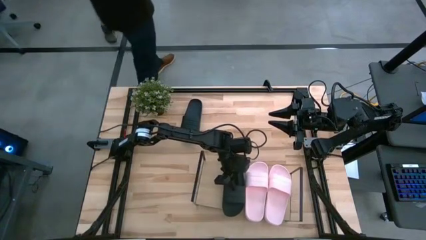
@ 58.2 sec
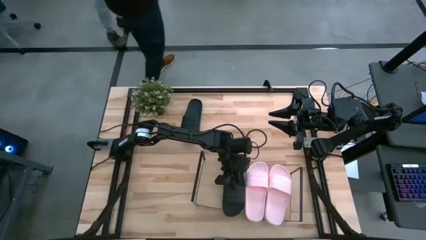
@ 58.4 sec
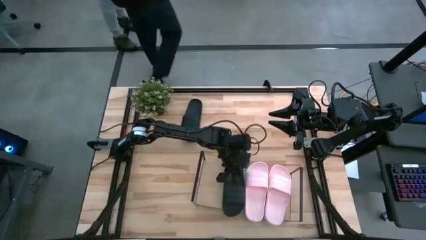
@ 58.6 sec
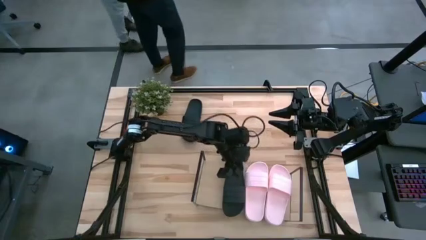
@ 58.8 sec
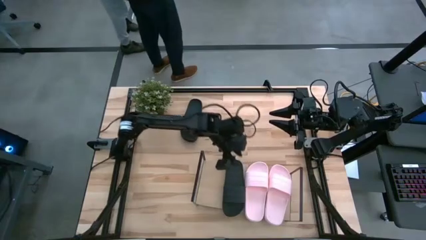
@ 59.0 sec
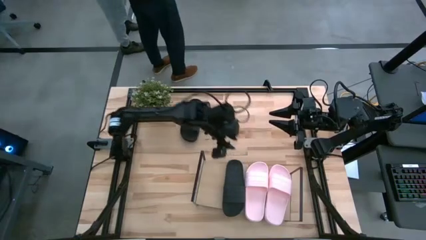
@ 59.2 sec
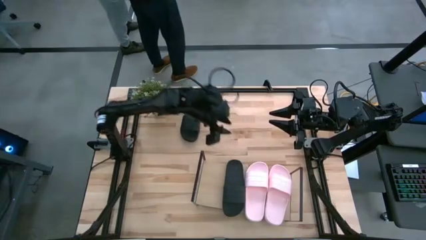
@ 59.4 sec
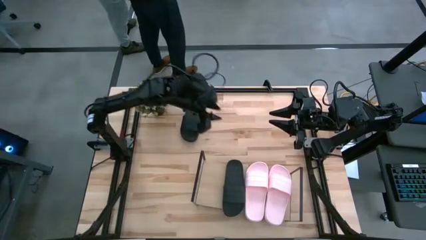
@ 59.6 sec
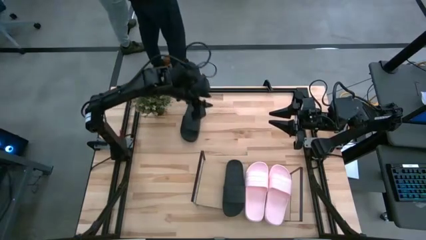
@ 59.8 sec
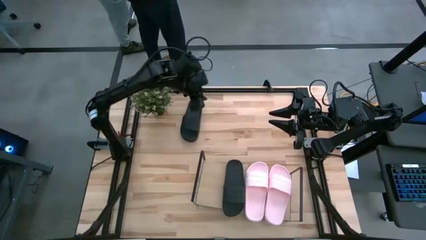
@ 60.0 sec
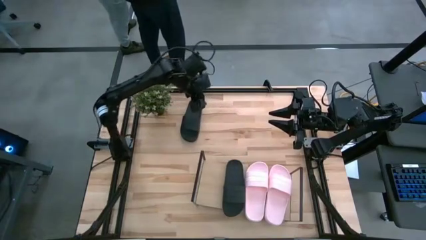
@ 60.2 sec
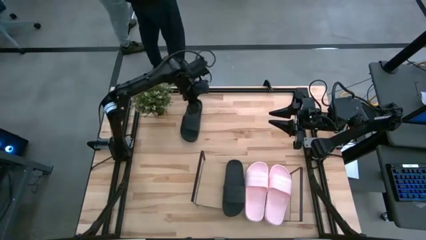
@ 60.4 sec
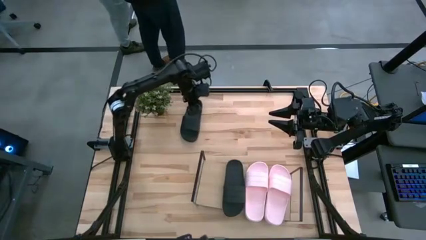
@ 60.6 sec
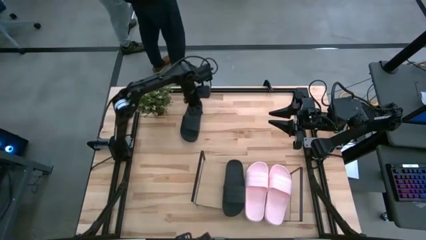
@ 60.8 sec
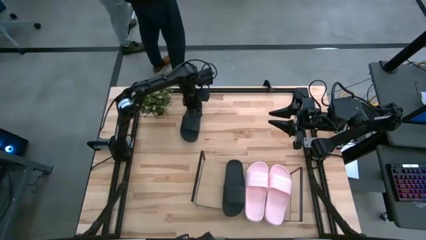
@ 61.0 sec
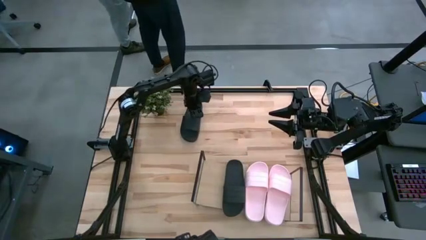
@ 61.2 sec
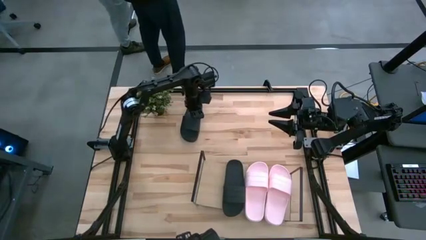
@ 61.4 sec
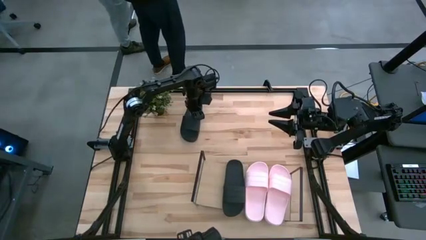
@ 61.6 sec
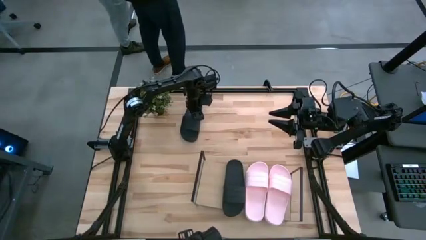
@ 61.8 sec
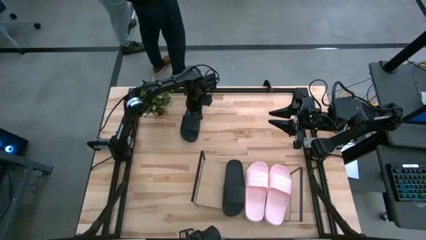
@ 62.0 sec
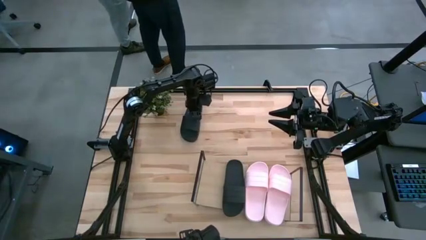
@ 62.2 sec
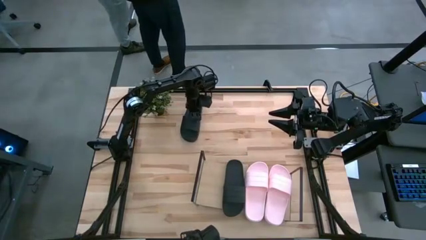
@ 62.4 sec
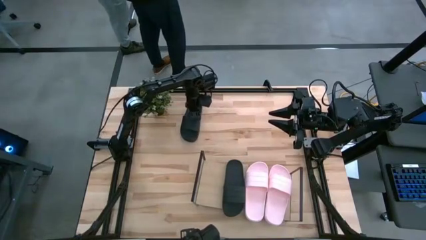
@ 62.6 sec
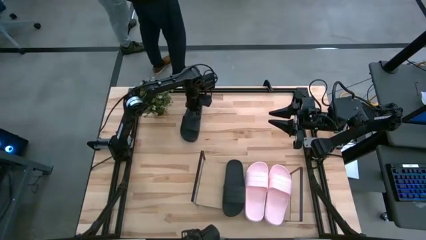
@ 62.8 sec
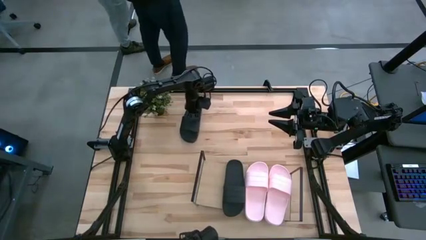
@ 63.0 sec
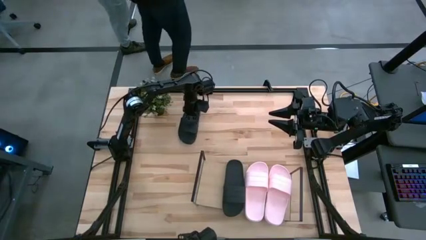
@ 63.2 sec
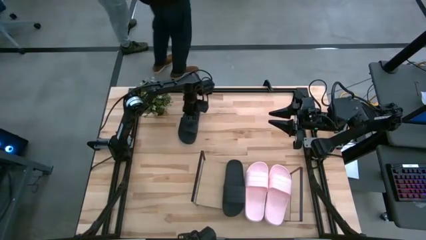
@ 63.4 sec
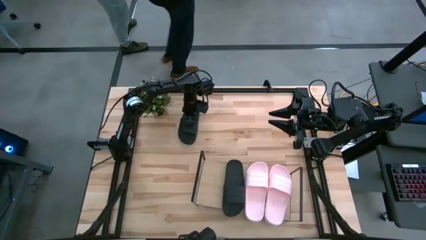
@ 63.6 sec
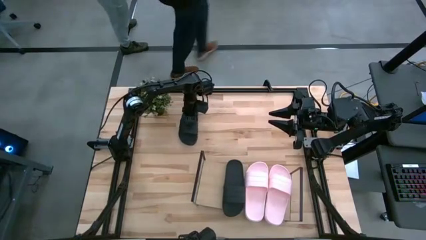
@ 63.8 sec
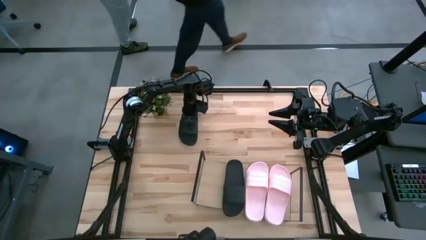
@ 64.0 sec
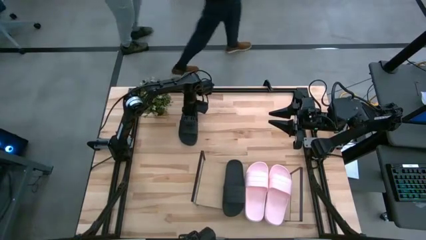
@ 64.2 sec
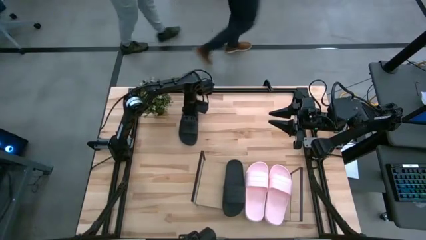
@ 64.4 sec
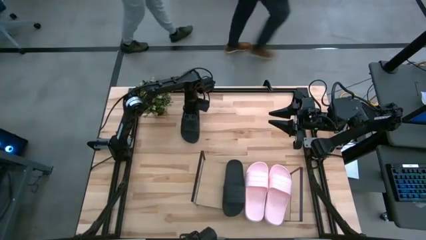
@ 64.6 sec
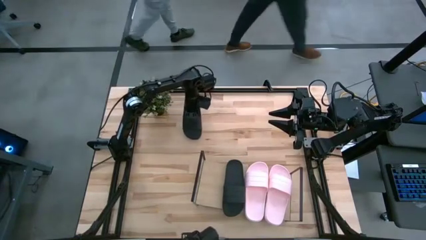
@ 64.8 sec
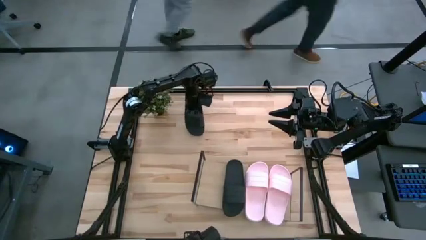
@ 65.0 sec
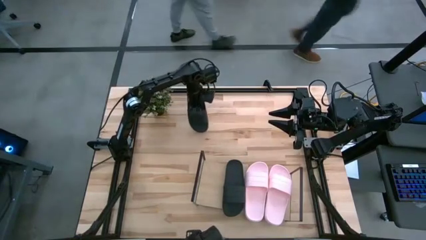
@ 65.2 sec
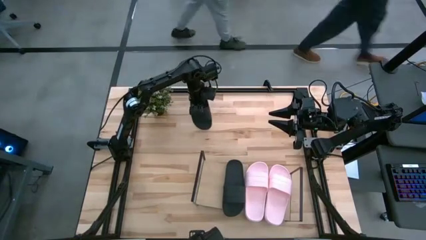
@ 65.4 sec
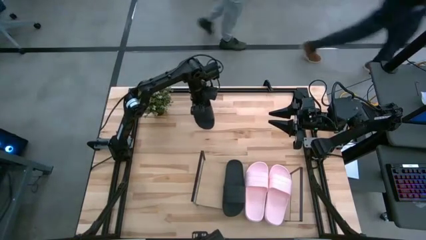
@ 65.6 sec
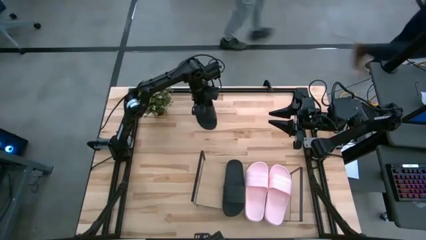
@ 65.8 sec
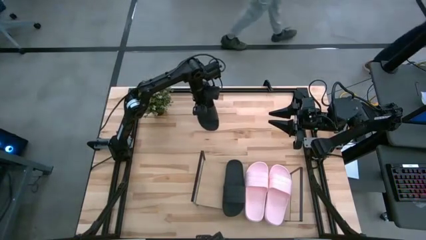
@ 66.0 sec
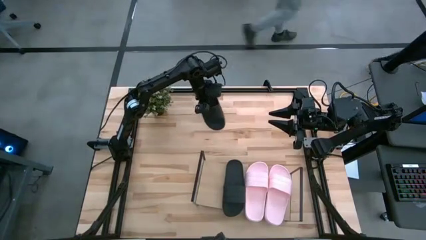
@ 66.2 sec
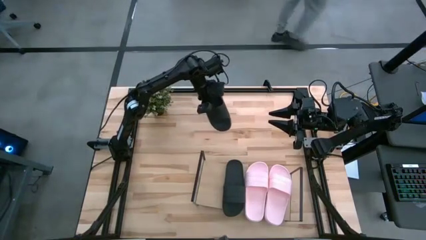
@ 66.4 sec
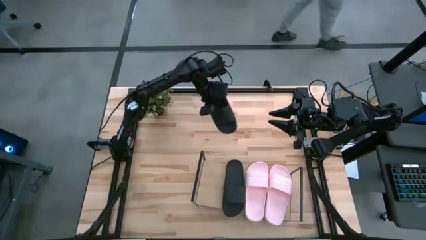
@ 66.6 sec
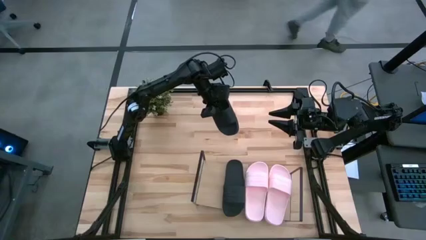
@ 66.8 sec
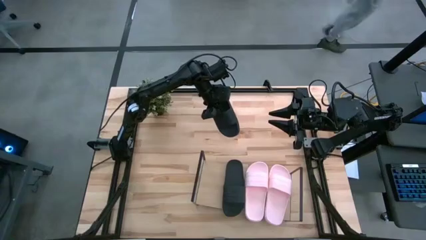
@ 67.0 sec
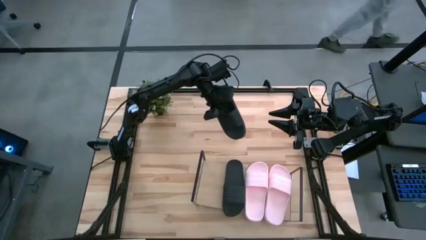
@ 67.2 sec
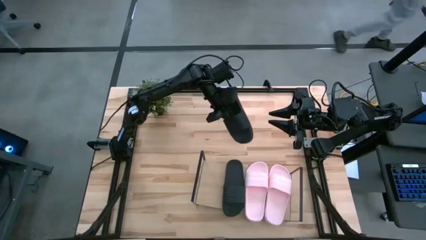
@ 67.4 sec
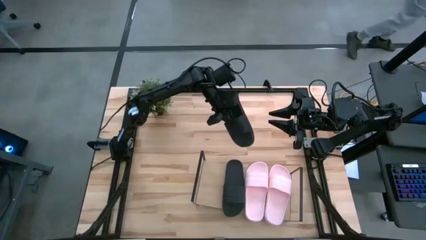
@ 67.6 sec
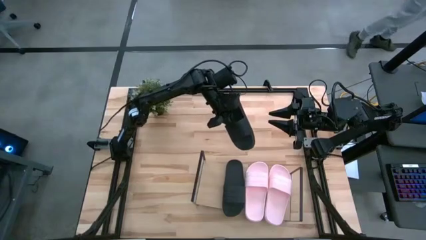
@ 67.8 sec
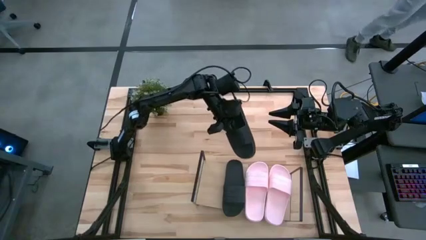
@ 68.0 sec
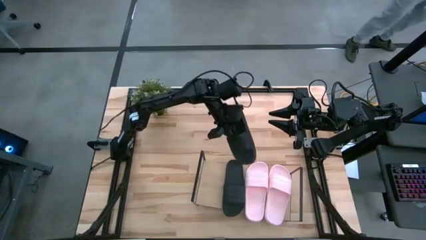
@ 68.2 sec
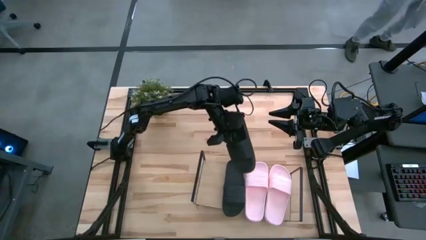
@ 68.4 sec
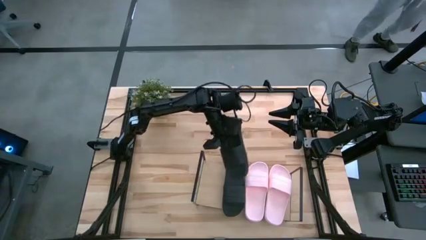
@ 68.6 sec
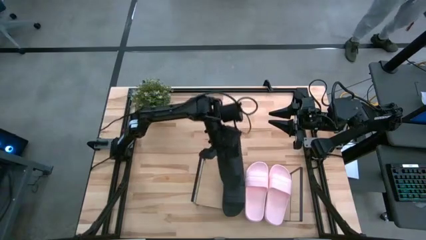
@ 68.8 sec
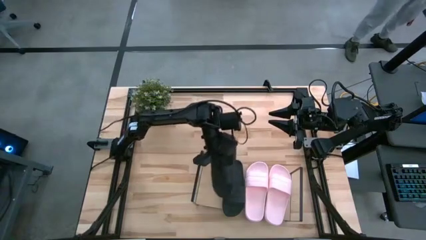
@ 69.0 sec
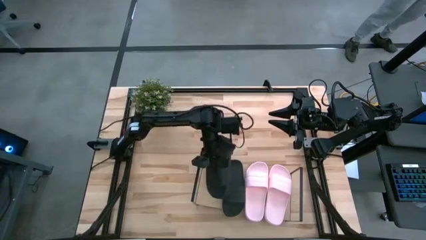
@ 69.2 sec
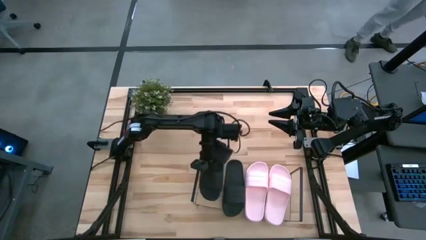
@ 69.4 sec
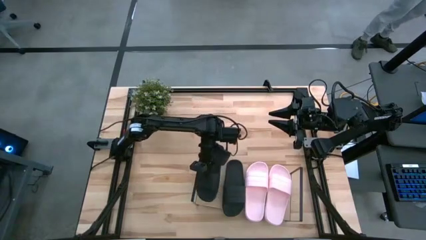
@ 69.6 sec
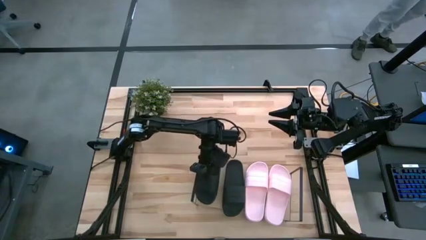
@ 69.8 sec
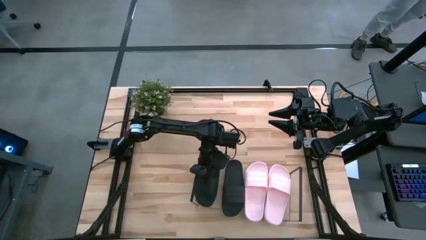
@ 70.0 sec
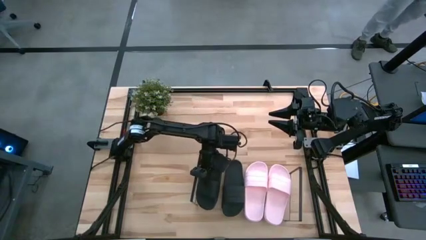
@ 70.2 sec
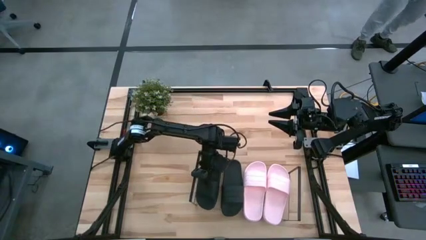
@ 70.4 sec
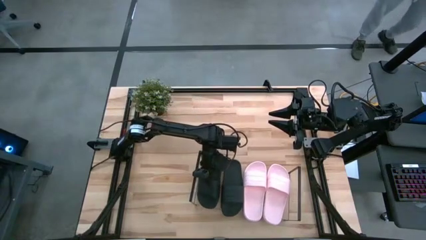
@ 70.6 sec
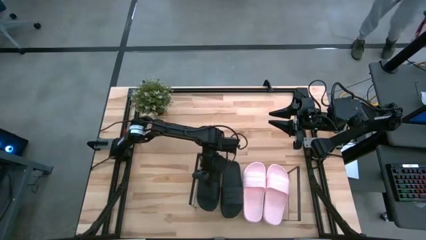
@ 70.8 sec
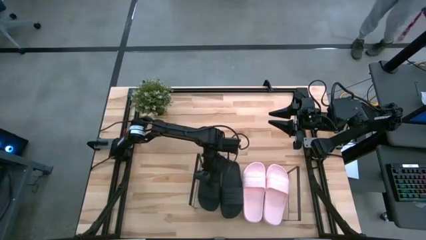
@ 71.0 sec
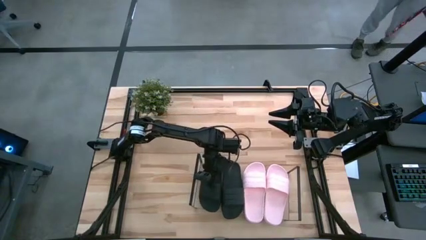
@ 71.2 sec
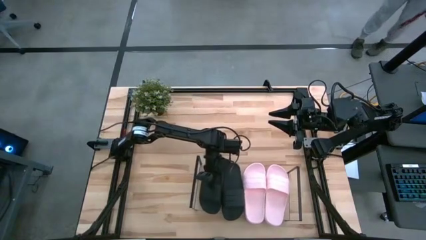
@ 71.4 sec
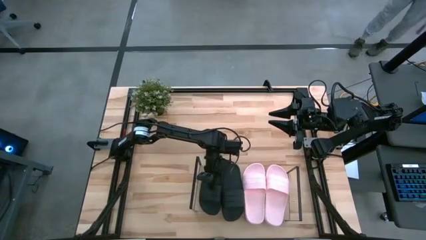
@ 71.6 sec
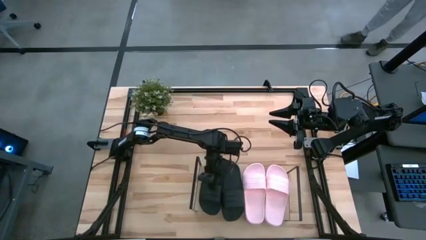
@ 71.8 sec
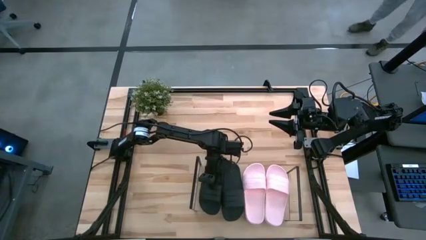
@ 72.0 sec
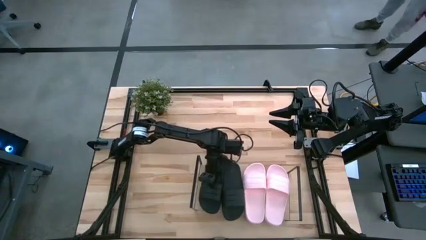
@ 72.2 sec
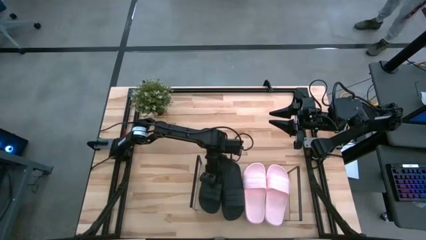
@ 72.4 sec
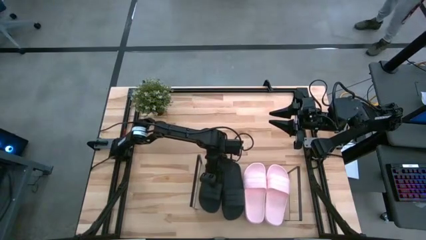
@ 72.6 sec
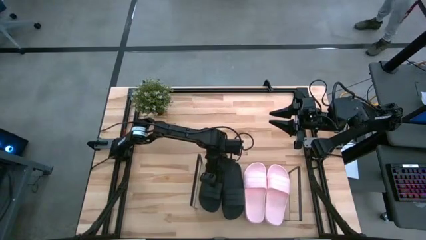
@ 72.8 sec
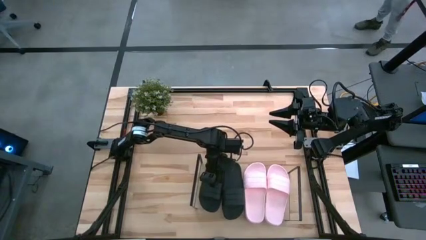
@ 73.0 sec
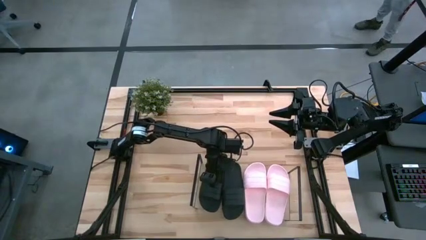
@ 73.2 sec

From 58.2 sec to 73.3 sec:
Task: Pick and place slides into the shelf
Put the black slide on the shelf
